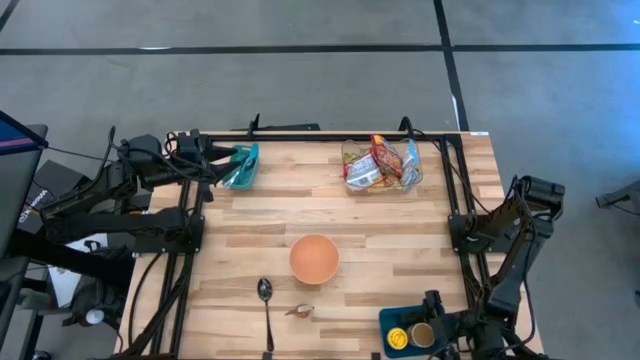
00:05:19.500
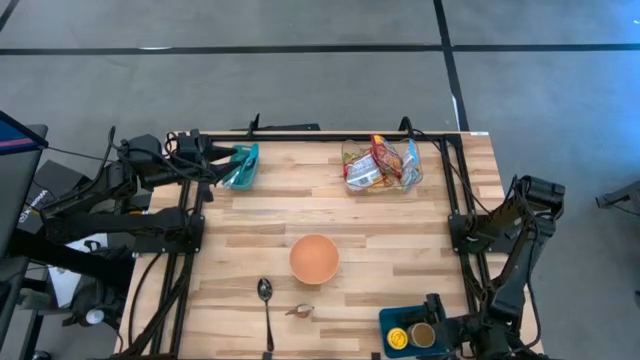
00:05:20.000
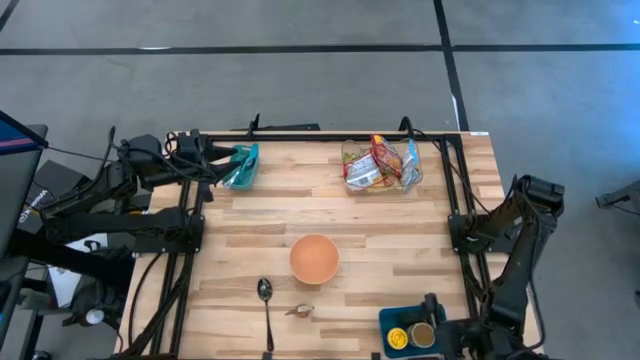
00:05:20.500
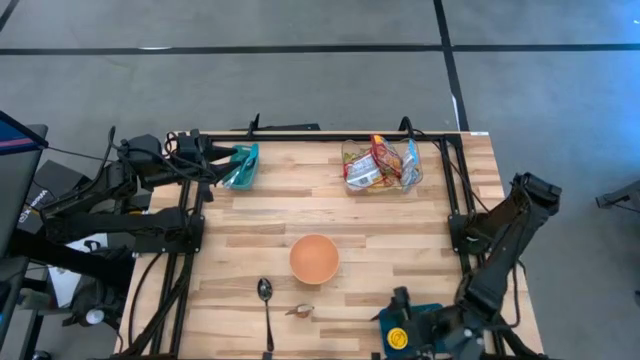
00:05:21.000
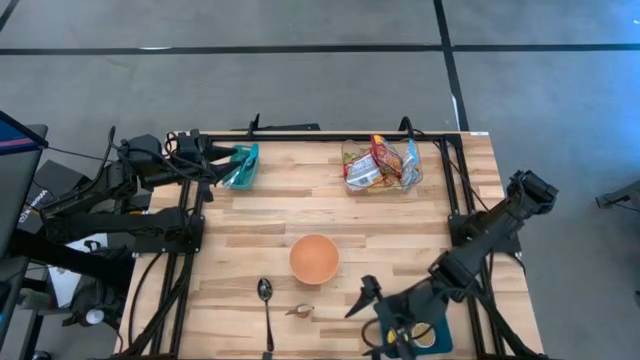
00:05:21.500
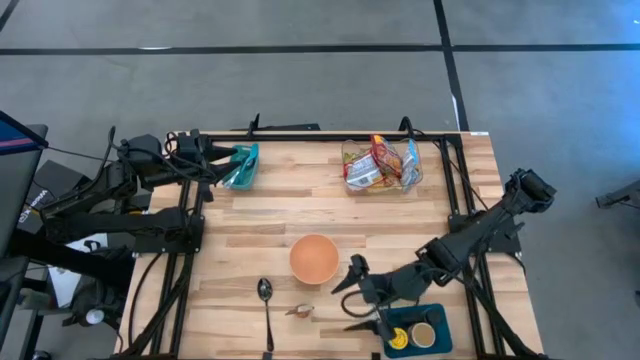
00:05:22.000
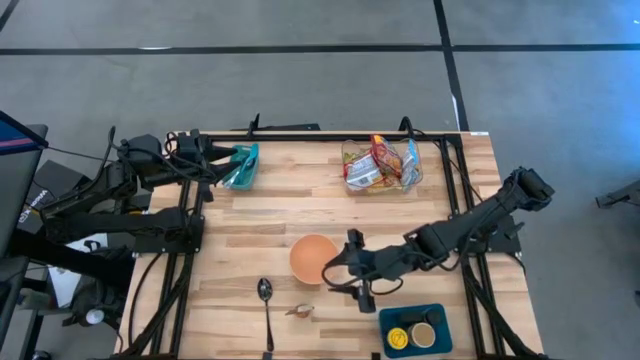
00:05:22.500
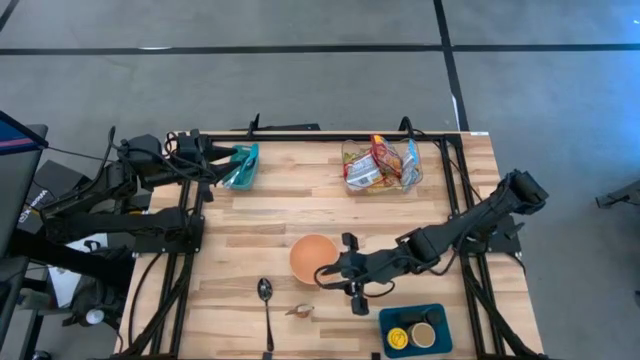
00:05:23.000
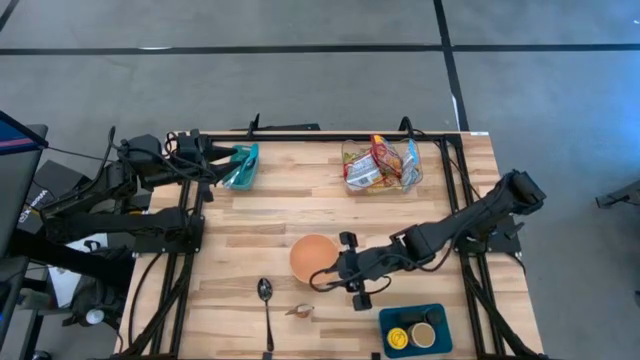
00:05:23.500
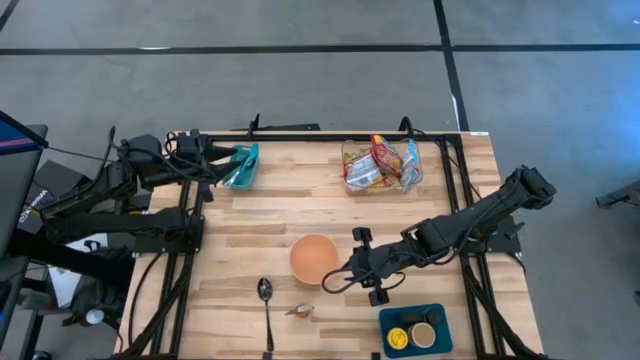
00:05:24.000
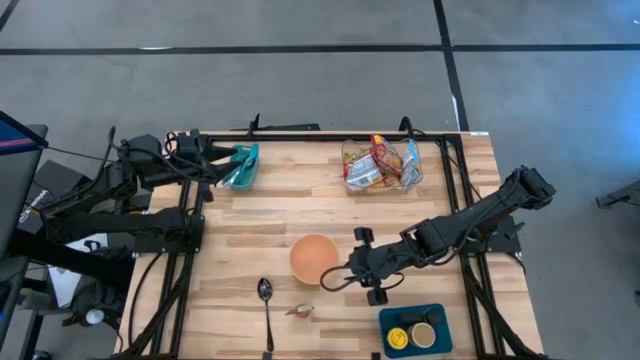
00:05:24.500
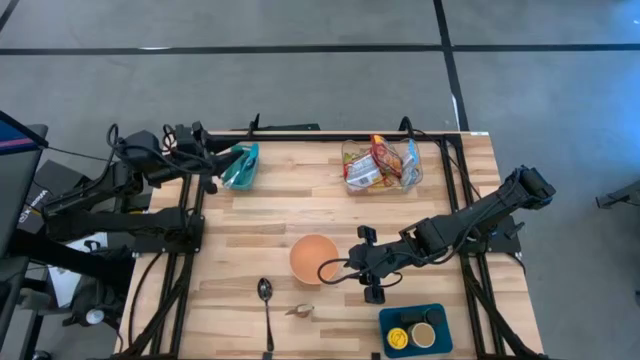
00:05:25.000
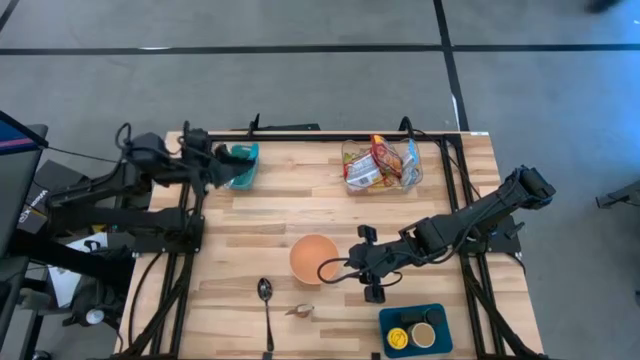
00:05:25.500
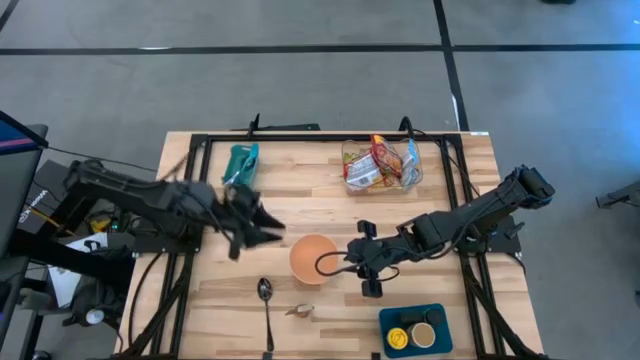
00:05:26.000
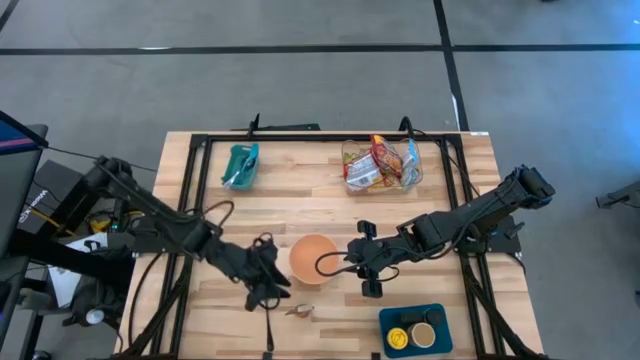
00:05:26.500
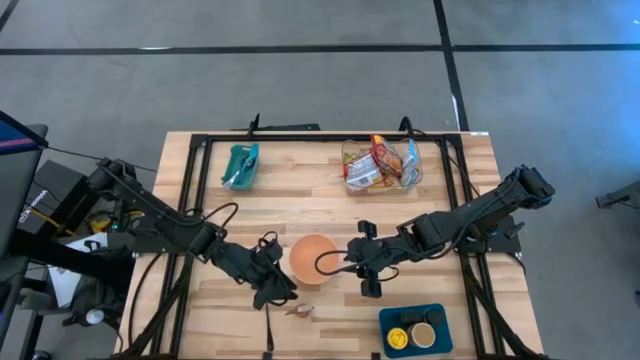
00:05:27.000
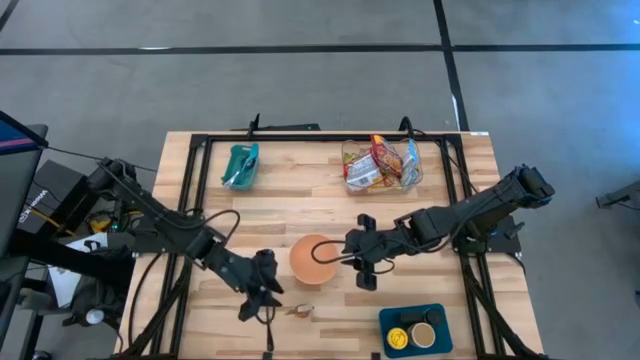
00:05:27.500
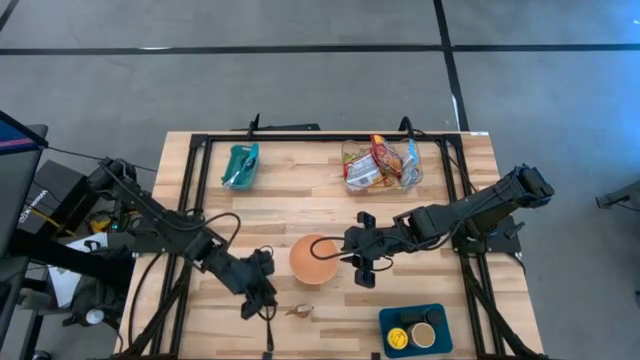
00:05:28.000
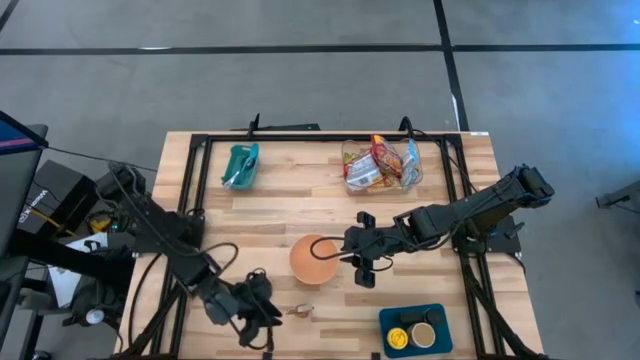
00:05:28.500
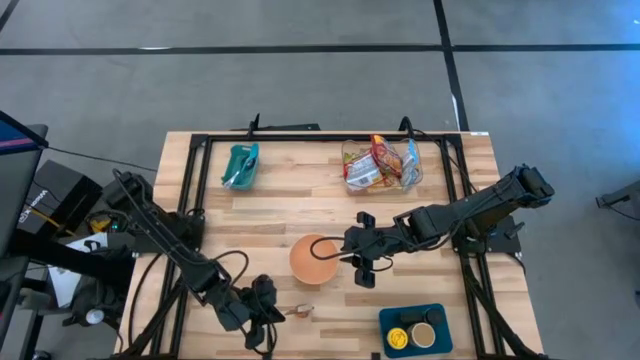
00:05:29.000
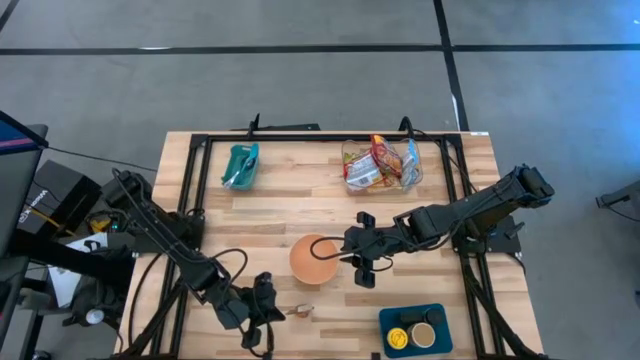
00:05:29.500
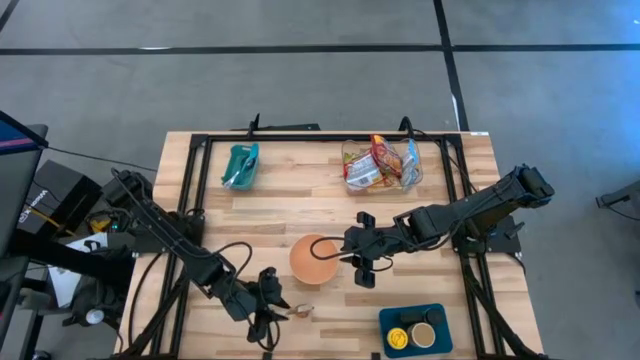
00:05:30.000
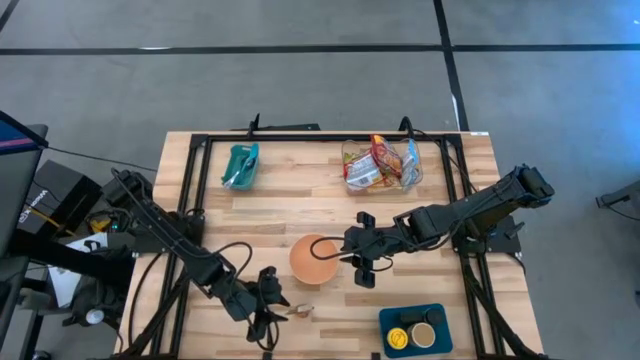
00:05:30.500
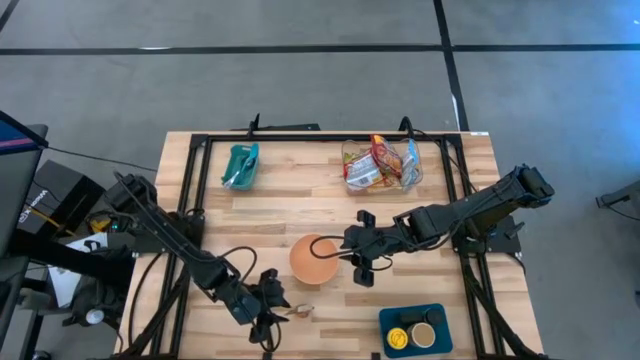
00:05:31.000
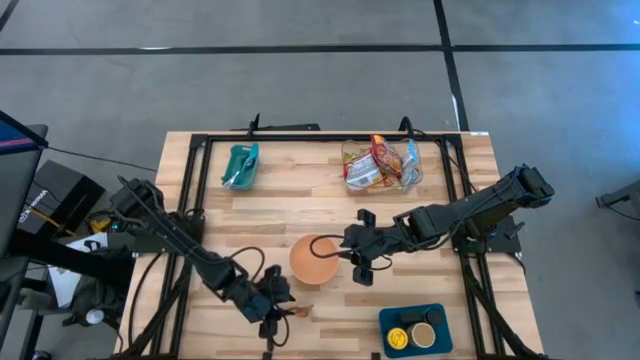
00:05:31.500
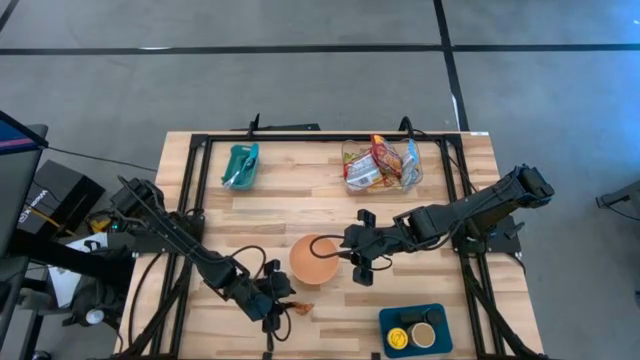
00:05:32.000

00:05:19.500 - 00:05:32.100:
Task: Pick & Place Food Item
Put the orange seasoning pack into the dark blue bin

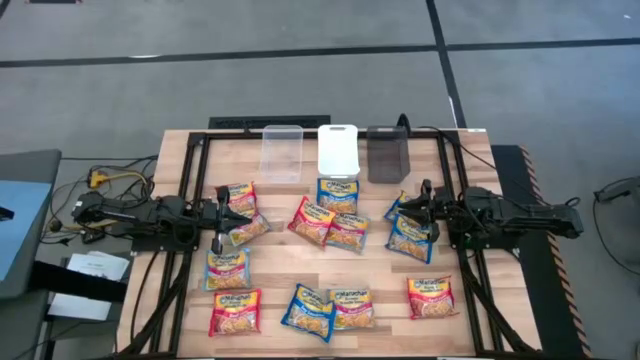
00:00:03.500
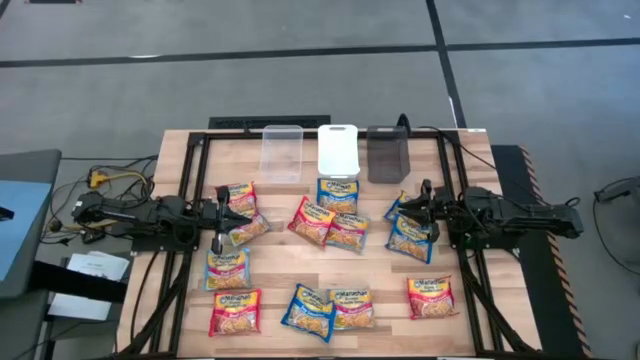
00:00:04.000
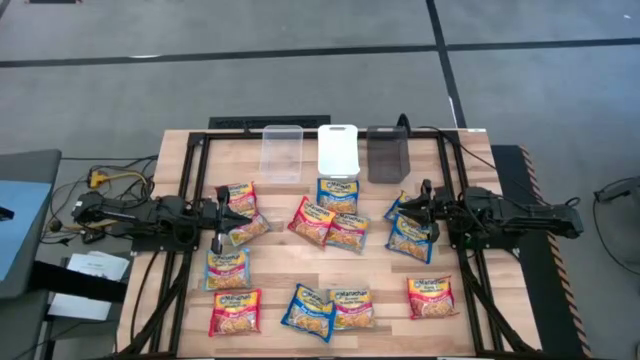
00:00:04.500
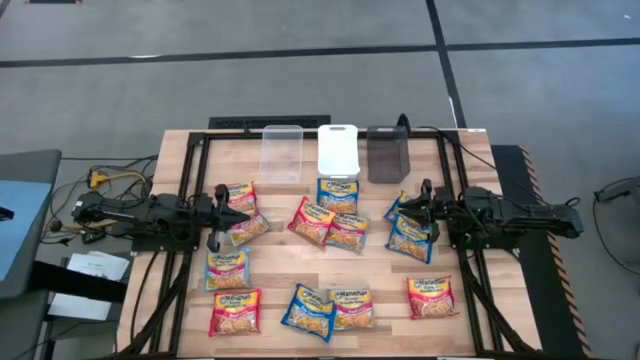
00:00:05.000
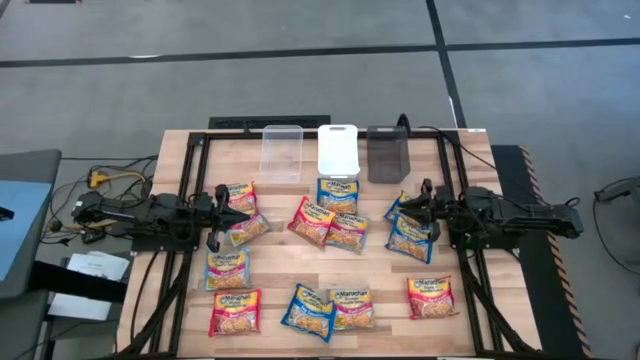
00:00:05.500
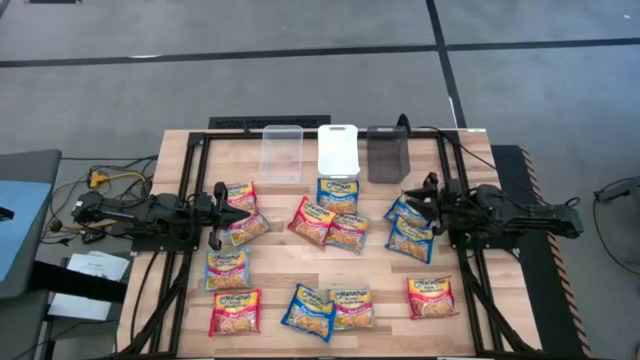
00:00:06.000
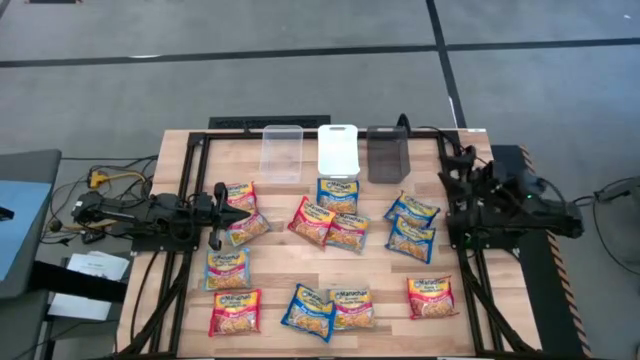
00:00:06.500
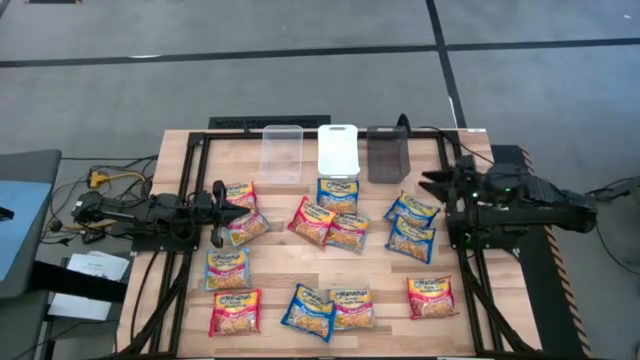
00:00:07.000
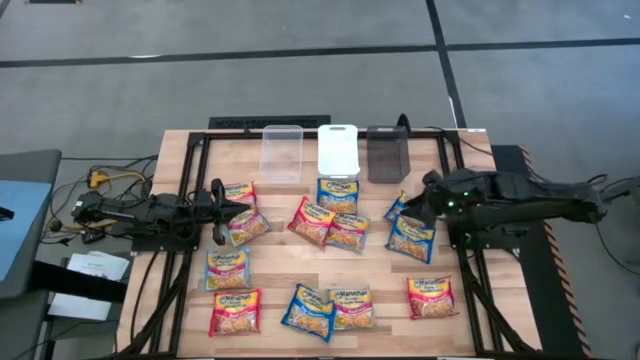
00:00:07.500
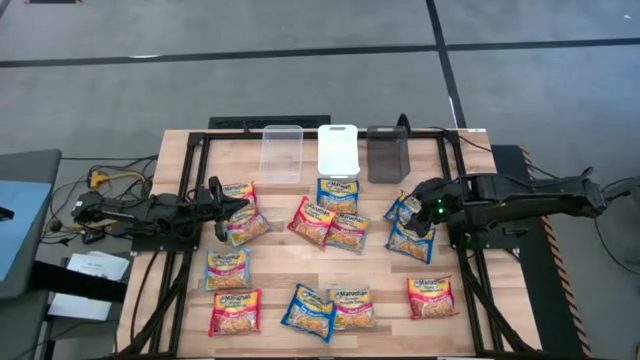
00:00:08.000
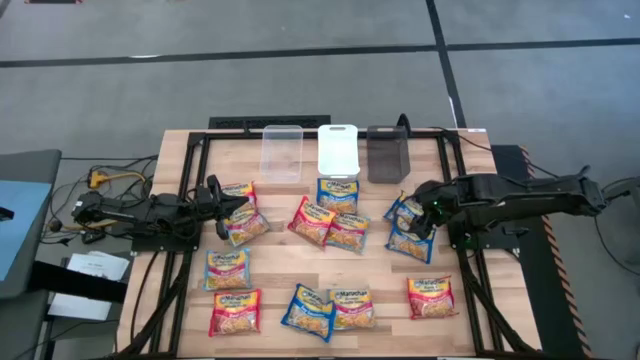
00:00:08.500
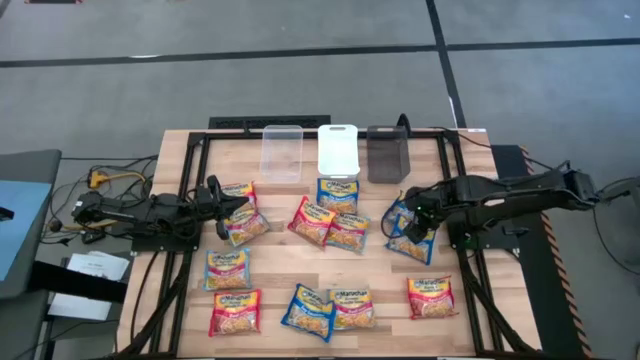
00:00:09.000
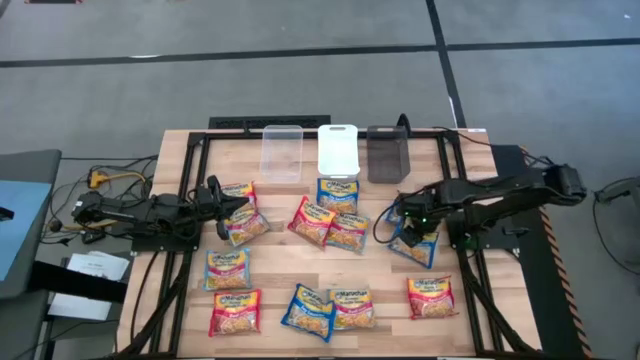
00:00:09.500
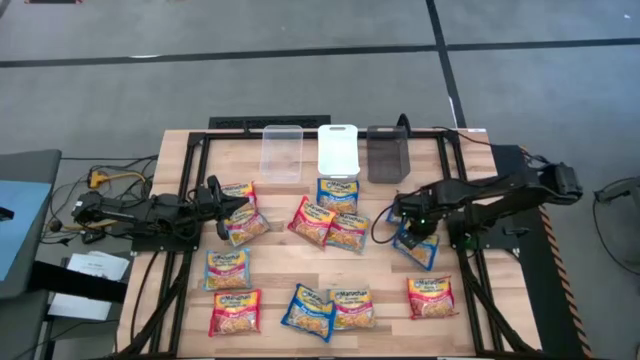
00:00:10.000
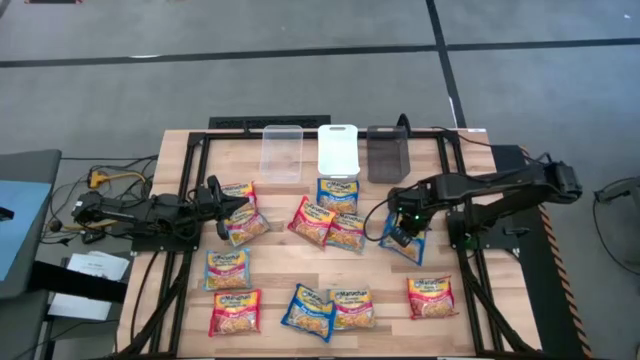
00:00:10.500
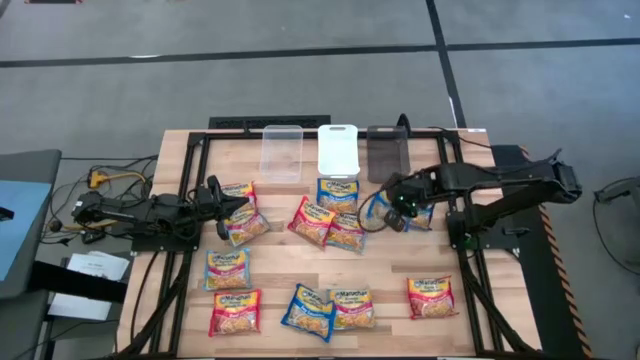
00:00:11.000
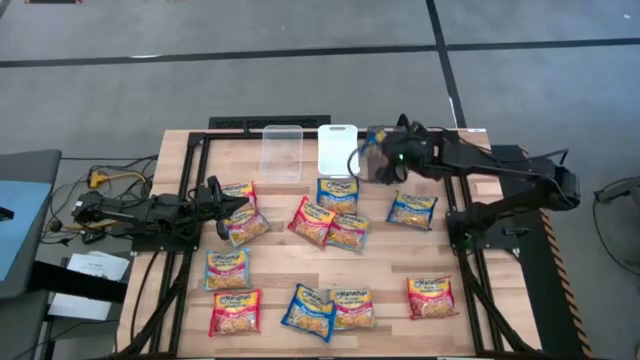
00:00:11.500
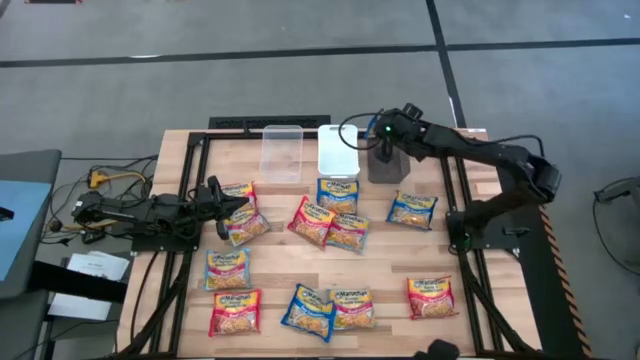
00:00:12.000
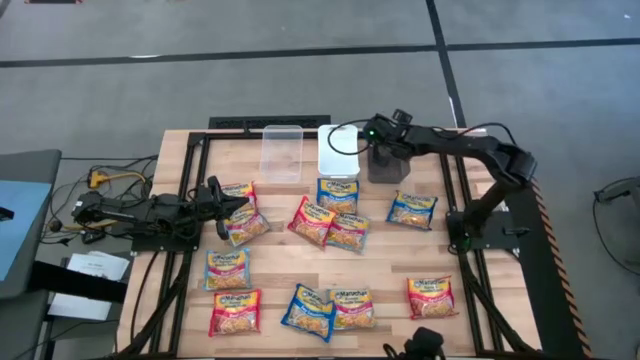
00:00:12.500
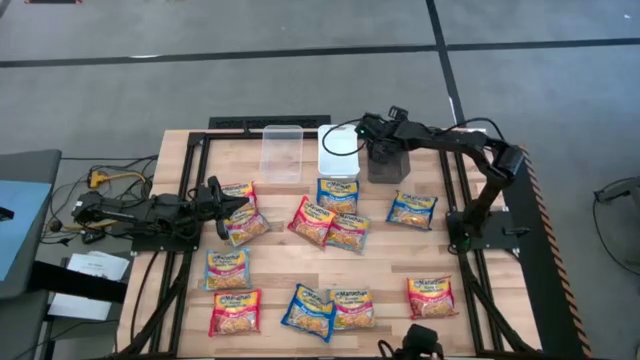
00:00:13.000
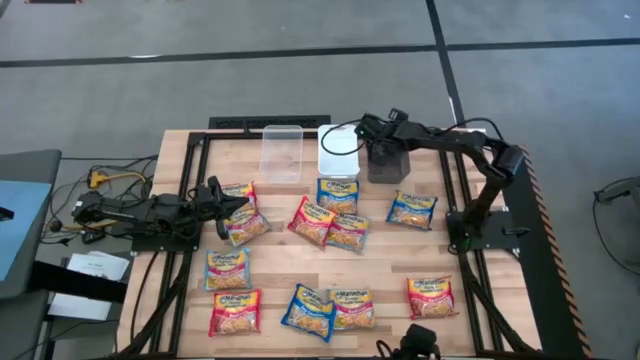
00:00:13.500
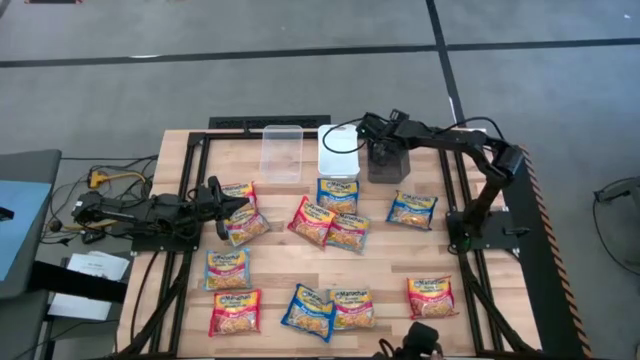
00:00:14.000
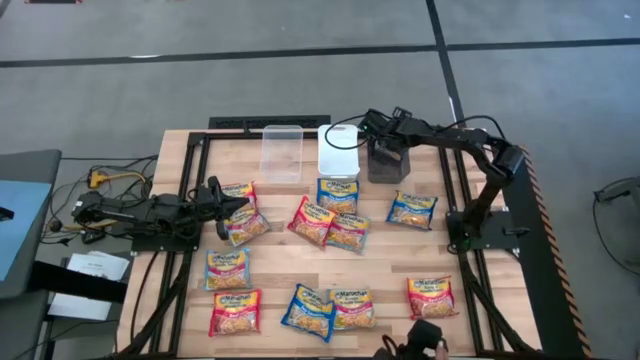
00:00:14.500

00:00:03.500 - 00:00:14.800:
Task: Sort Maruchan noodles
Put the blue noodle pack into the black bin
